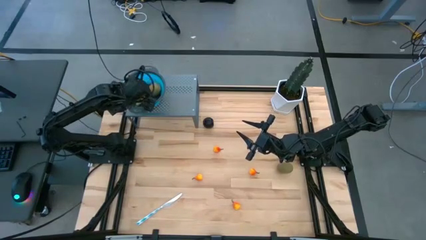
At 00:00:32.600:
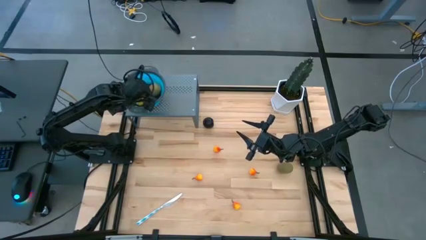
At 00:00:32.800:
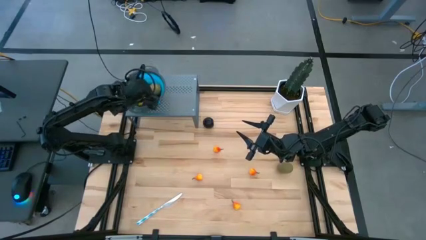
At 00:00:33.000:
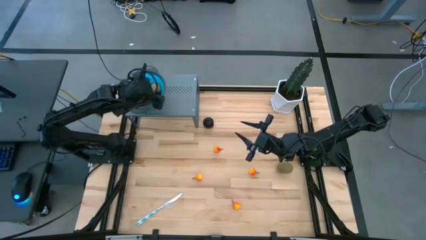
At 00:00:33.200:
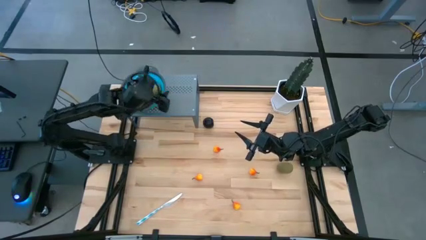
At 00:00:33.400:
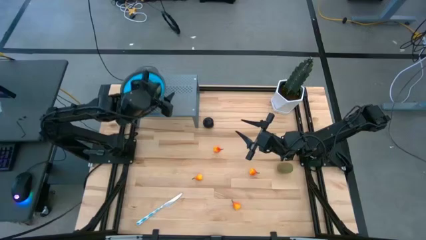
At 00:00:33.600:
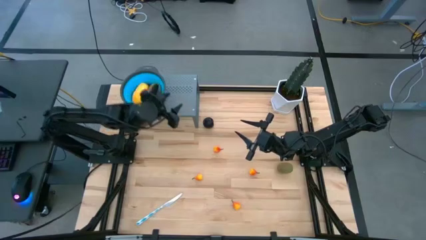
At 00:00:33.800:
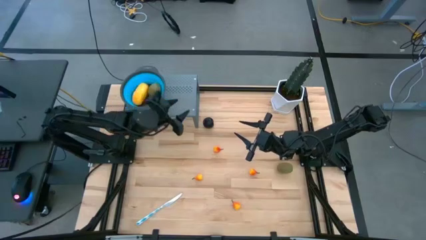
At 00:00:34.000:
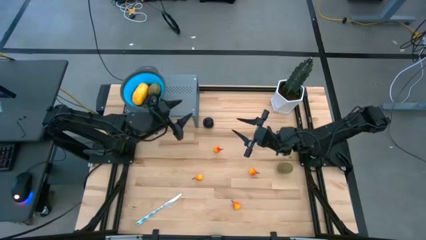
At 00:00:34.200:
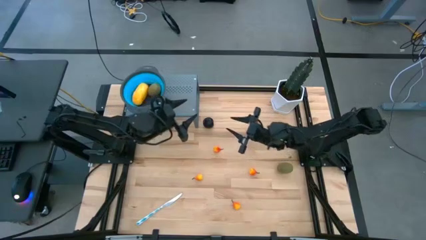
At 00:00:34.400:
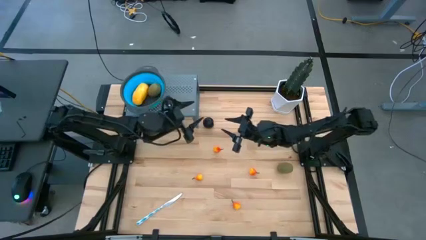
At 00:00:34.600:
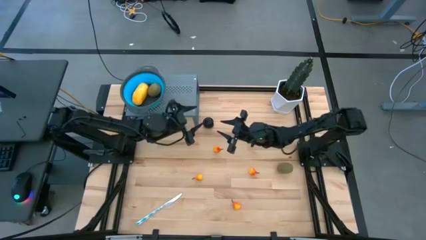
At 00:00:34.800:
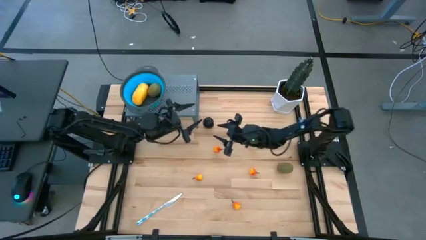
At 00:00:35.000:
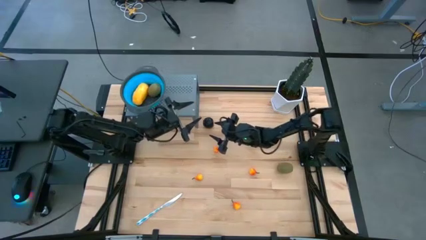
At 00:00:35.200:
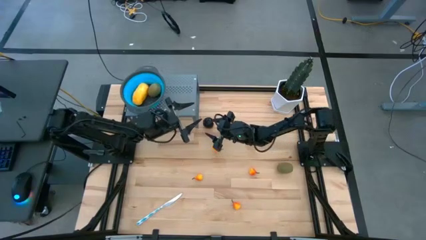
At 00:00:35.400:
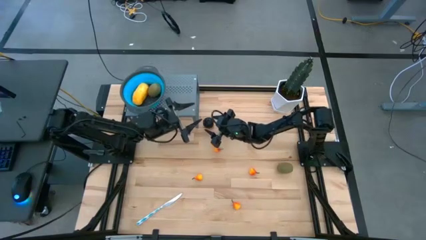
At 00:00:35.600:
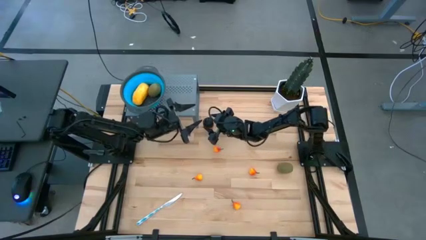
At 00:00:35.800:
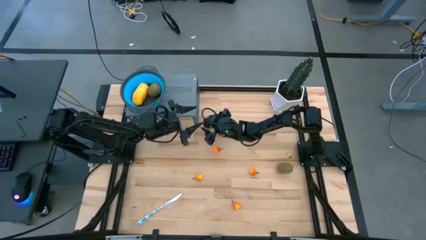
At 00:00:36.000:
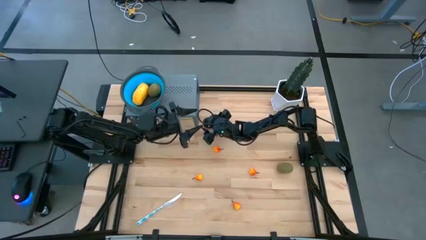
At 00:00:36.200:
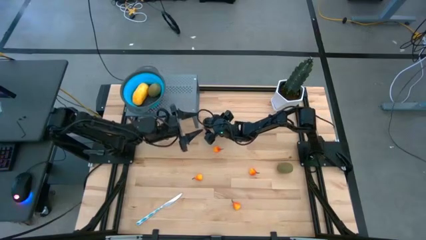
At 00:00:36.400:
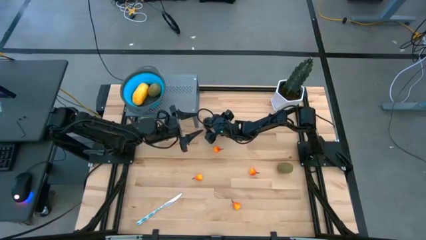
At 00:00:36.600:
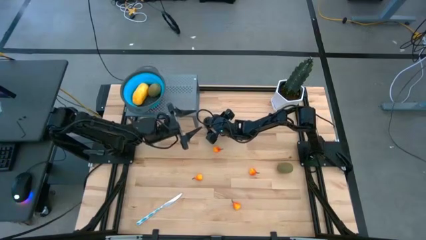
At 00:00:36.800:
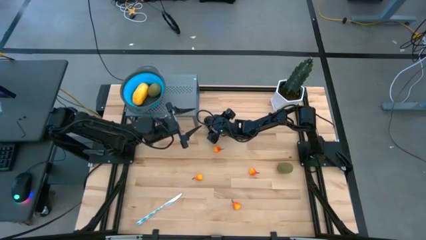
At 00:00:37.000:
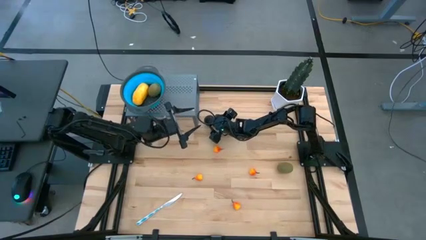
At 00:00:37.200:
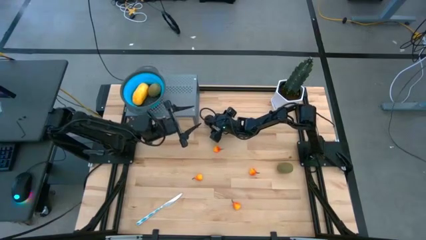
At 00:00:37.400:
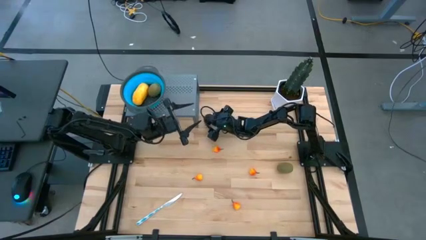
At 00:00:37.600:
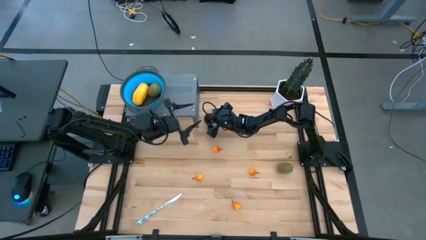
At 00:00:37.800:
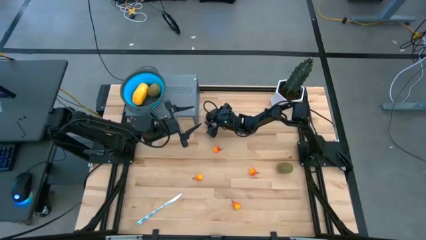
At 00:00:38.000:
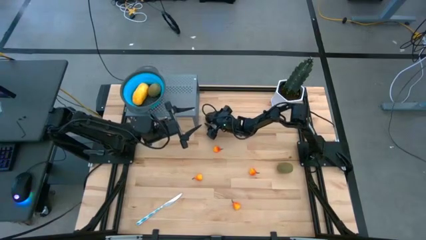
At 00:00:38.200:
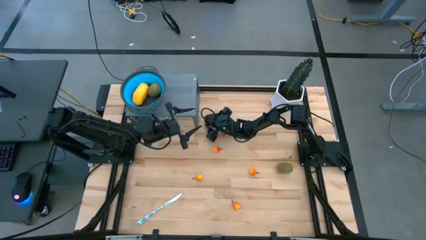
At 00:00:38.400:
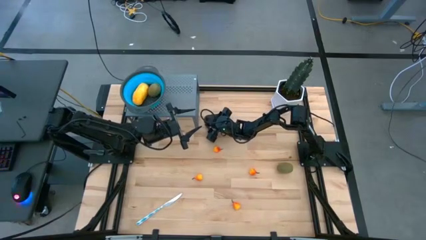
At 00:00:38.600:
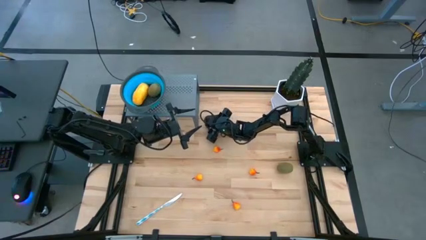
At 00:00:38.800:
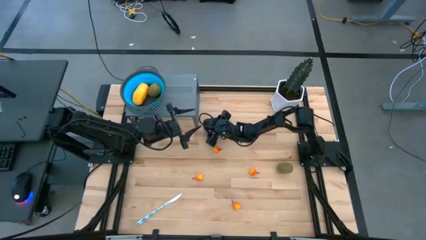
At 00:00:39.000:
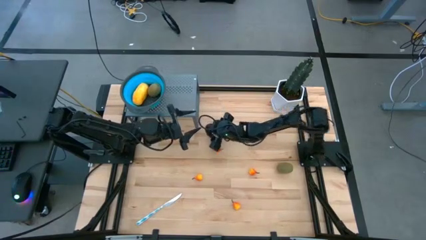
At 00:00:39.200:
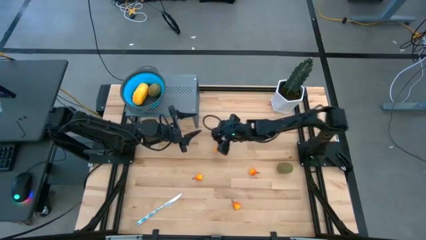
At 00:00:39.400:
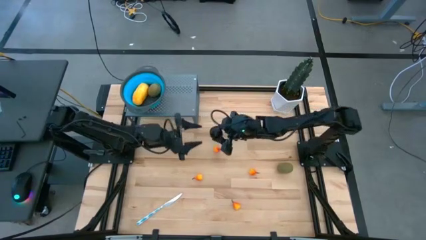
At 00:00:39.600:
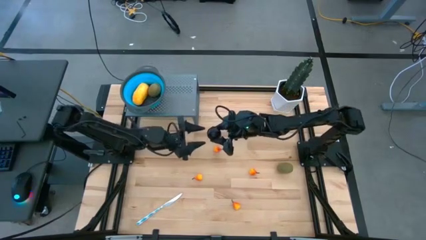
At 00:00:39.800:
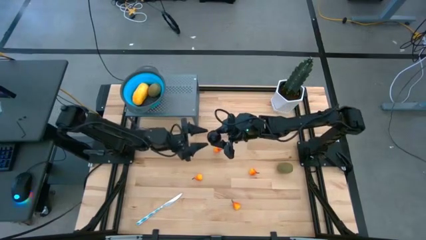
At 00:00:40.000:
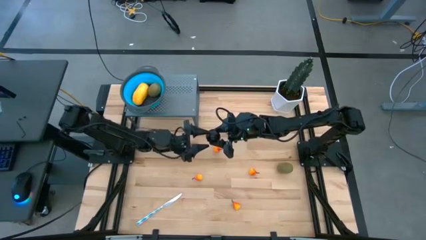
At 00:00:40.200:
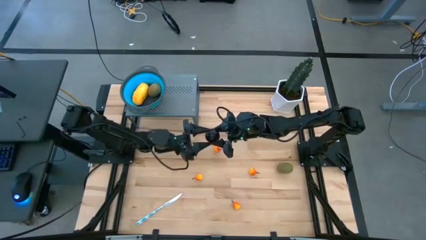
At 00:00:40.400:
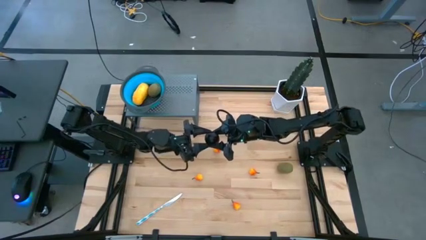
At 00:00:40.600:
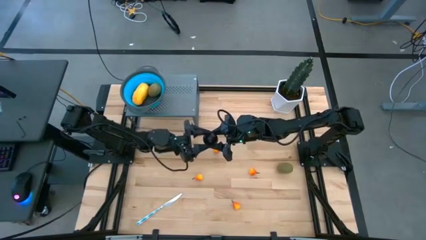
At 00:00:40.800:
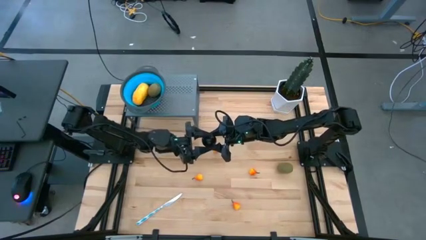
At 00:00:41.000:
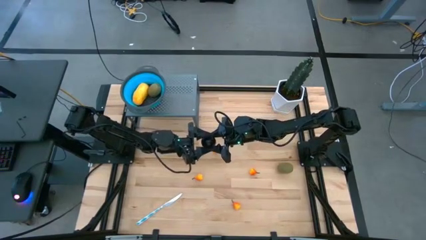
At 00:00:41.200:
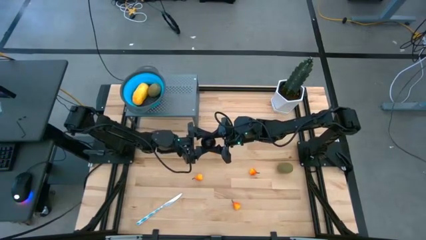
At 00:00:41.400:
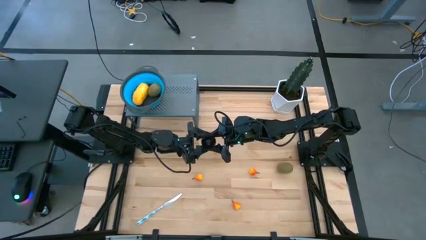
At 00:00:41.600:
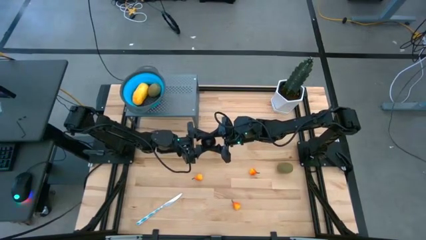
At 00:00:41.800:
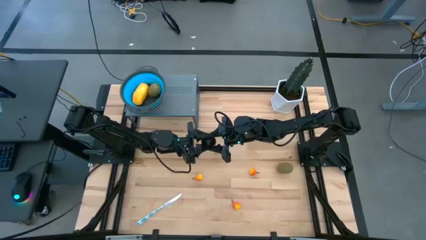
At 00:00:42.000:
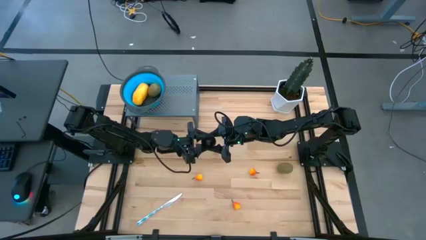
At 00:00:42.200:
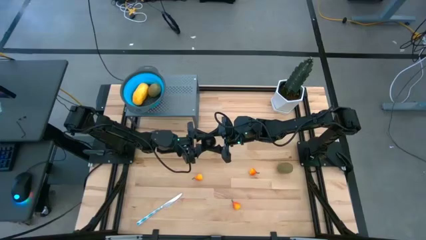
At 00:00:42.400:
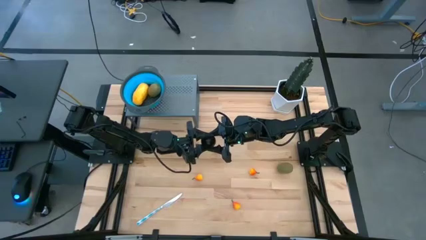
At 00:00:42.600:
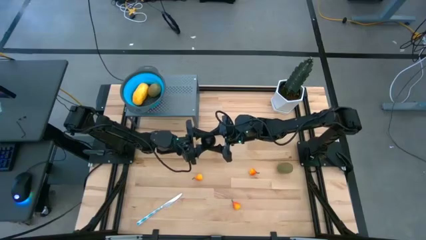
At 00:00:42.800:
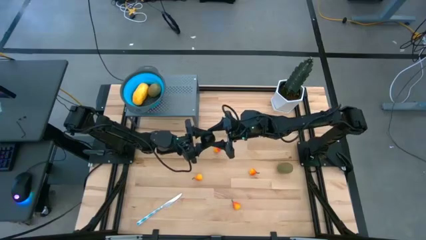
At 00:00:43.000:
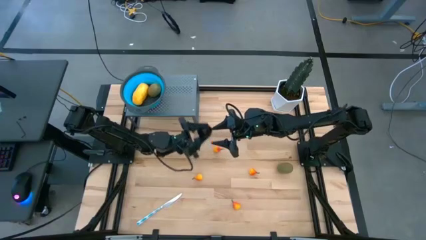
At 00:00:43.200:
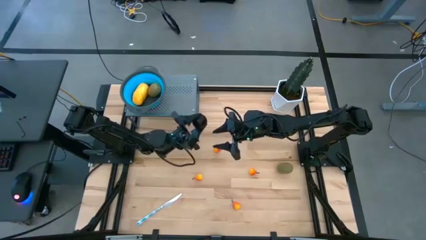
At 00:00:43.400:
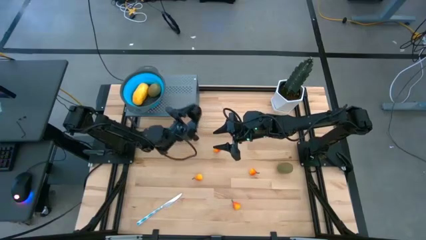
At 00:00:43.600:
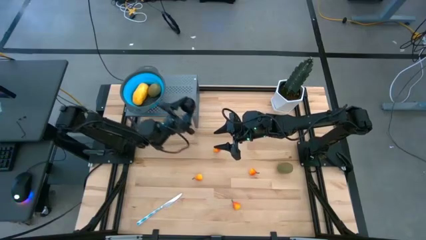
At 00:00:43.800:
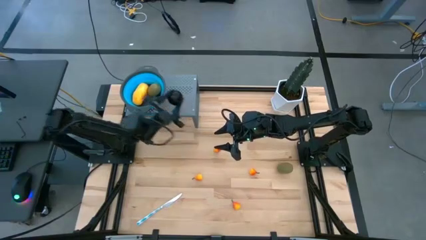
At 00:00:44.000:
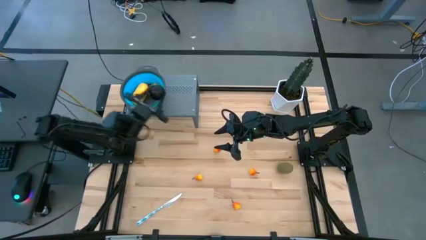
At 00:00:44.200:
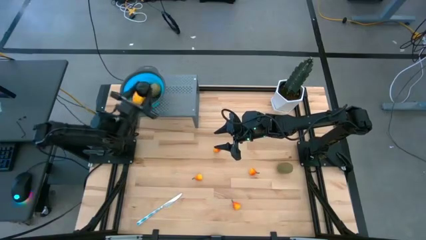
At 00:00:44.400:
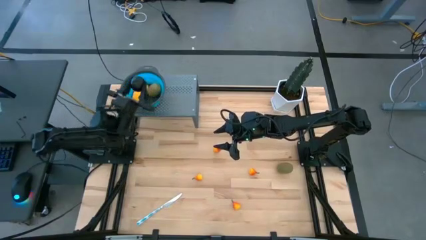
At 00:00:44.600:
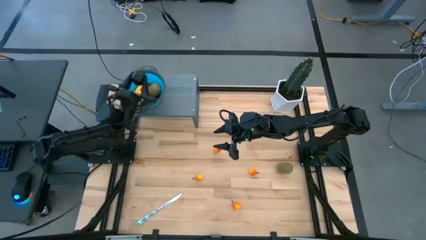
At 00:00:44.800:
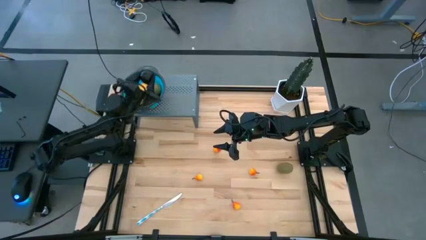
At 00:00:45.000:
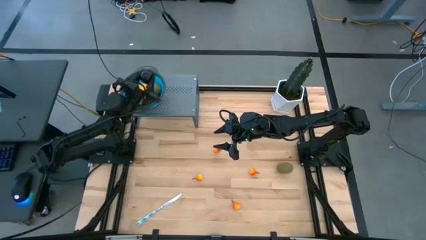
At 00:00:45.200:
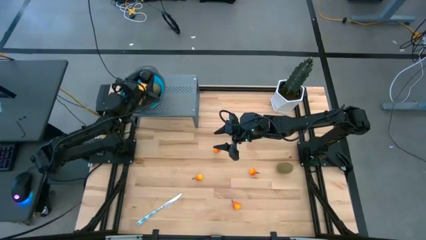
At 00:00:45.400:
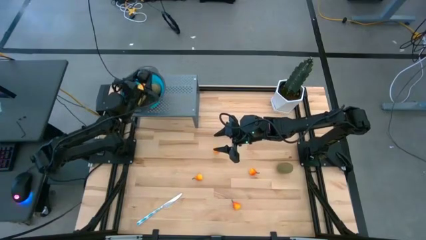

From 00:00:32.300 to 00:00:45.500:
Task: Pick & Place Fruit
Put the black plum into the blue strainer bowl on the shelf
